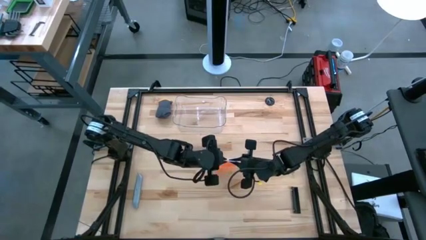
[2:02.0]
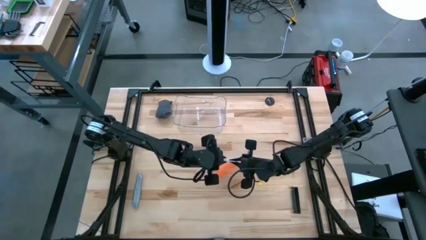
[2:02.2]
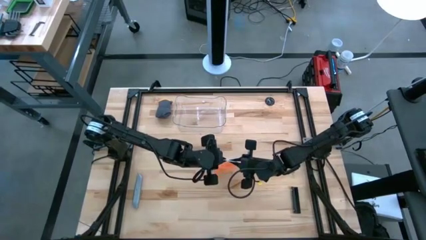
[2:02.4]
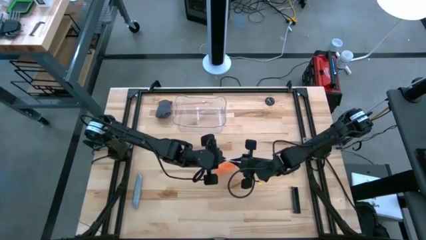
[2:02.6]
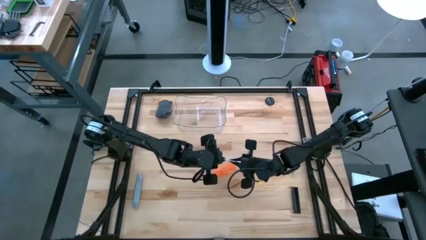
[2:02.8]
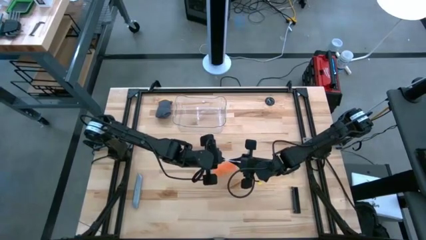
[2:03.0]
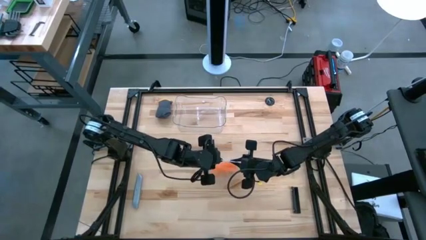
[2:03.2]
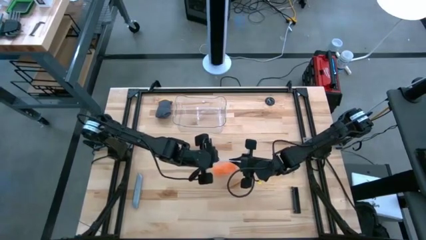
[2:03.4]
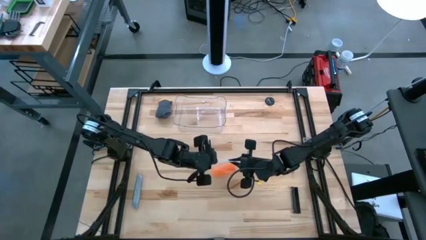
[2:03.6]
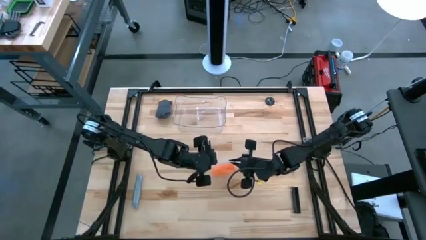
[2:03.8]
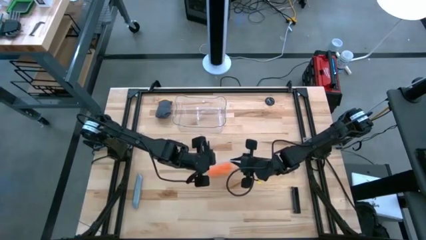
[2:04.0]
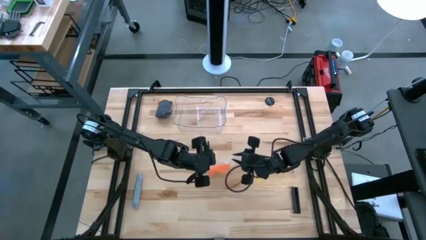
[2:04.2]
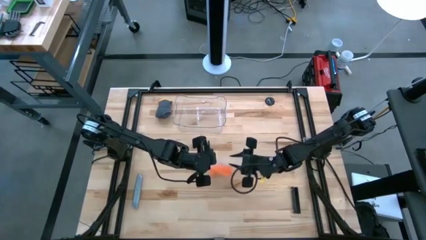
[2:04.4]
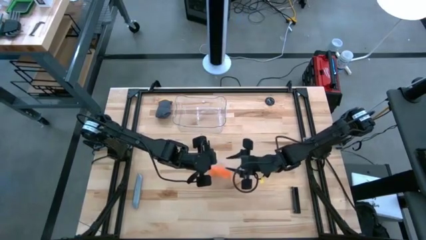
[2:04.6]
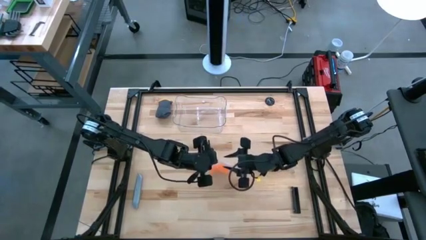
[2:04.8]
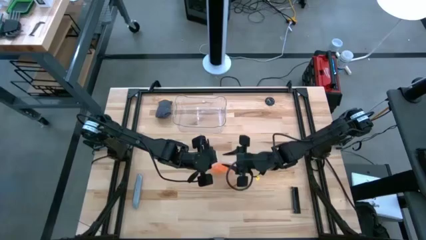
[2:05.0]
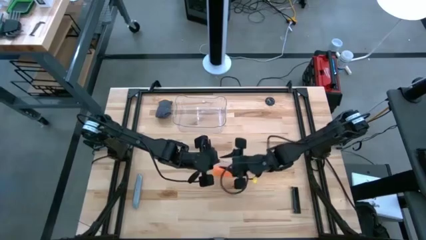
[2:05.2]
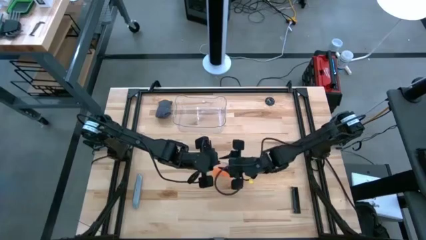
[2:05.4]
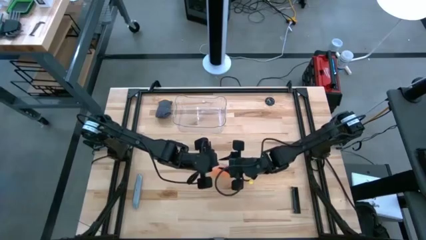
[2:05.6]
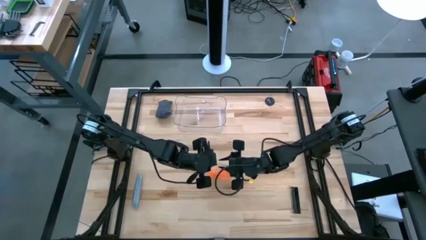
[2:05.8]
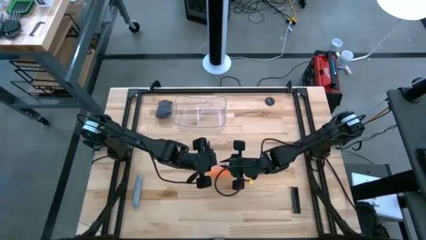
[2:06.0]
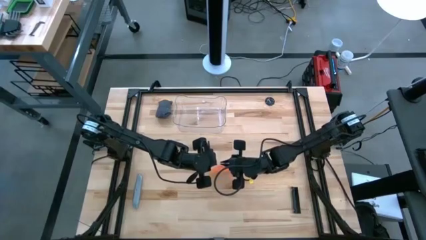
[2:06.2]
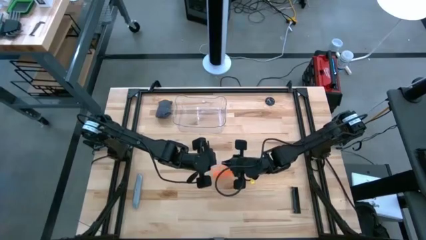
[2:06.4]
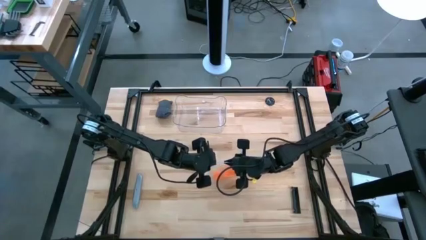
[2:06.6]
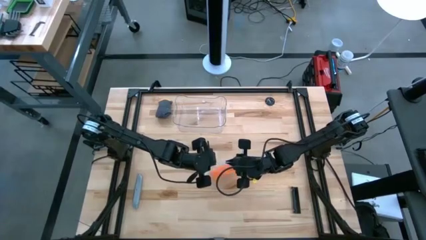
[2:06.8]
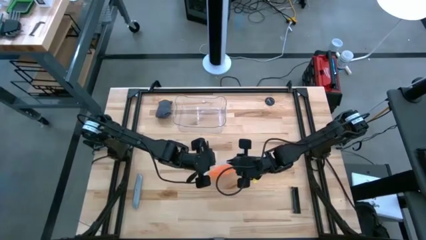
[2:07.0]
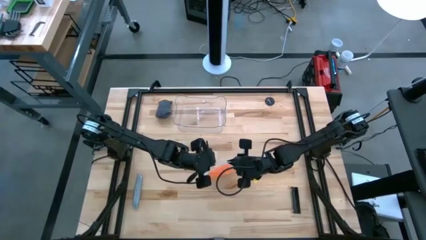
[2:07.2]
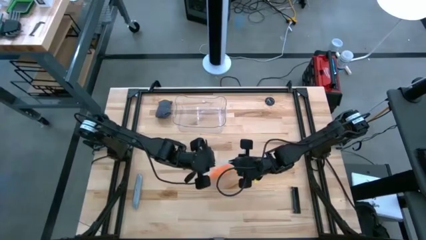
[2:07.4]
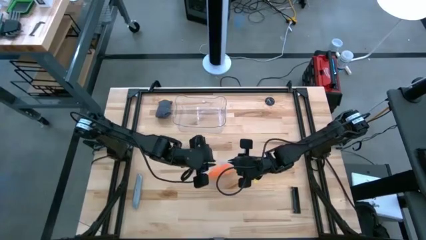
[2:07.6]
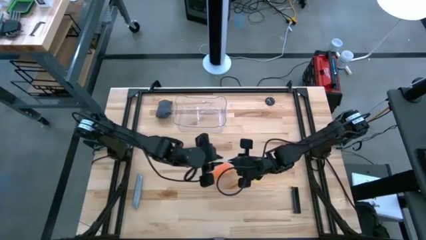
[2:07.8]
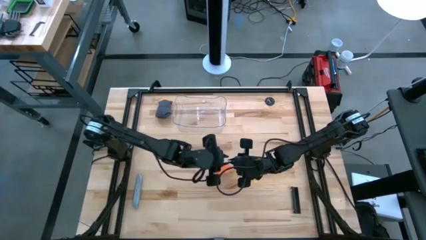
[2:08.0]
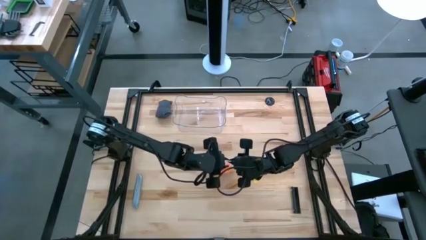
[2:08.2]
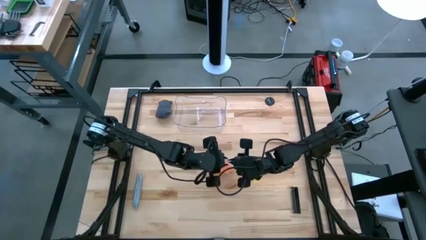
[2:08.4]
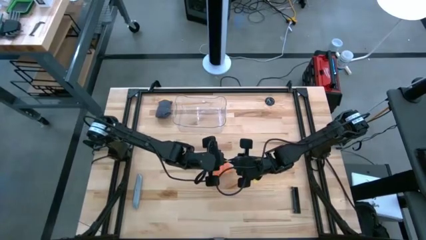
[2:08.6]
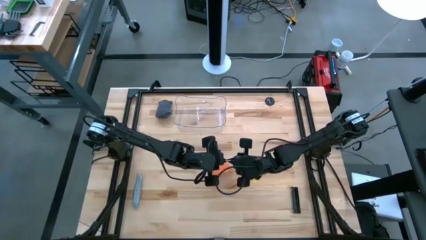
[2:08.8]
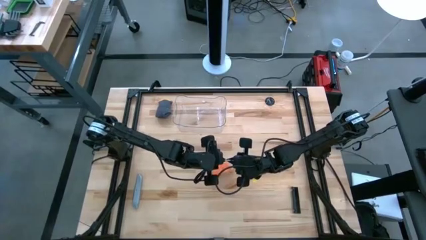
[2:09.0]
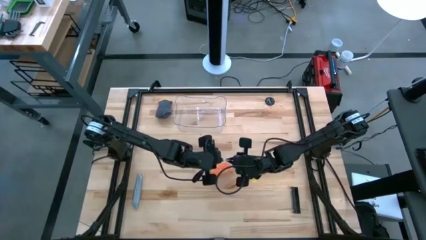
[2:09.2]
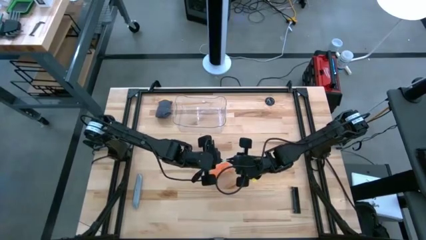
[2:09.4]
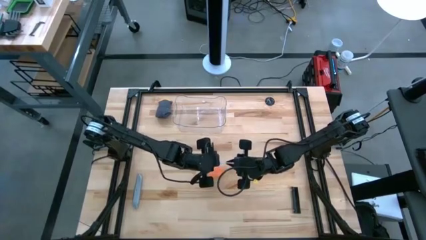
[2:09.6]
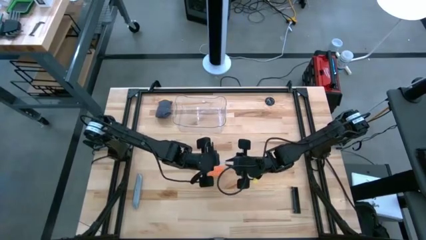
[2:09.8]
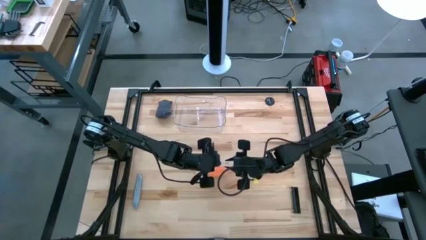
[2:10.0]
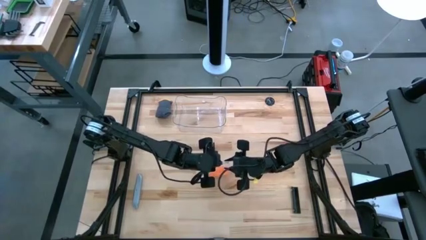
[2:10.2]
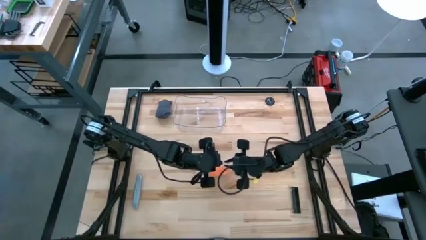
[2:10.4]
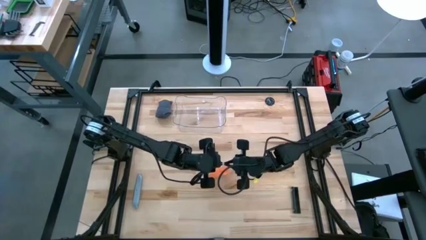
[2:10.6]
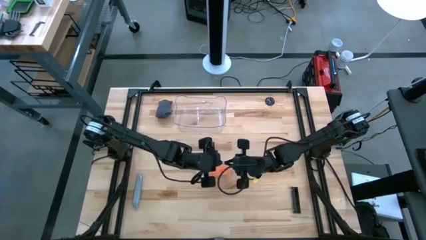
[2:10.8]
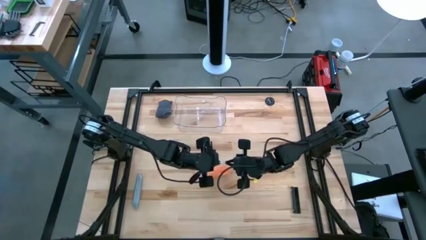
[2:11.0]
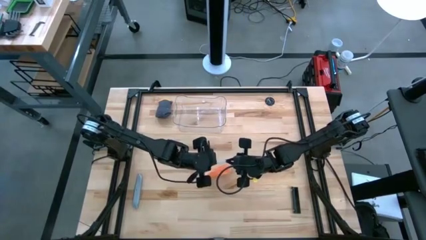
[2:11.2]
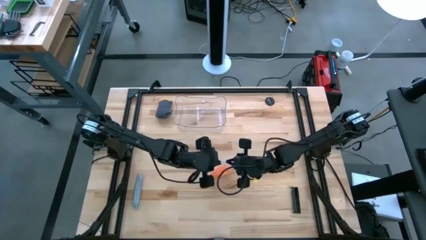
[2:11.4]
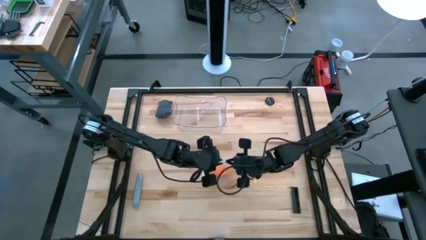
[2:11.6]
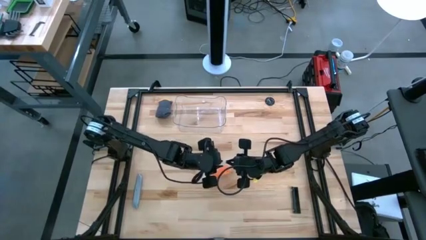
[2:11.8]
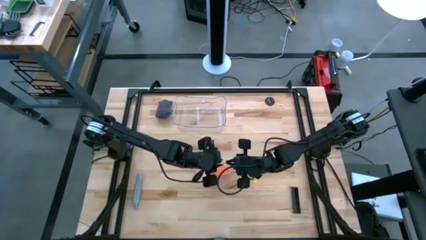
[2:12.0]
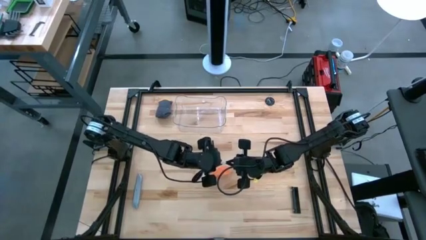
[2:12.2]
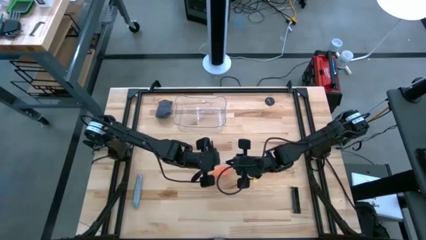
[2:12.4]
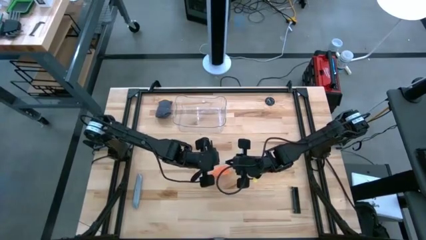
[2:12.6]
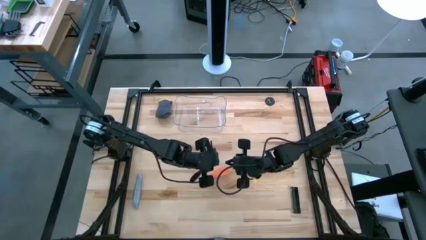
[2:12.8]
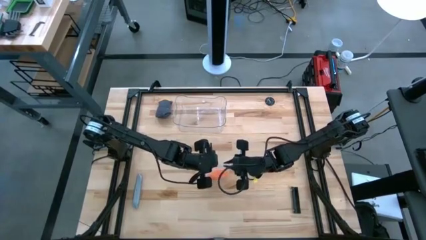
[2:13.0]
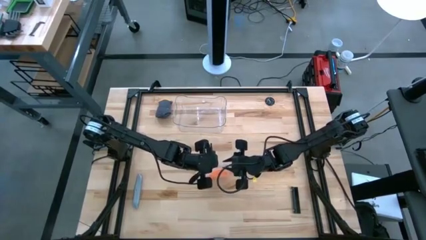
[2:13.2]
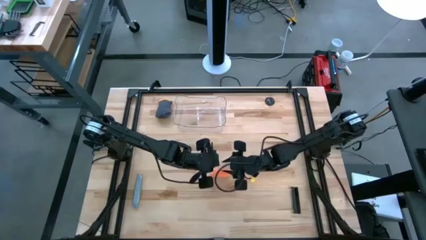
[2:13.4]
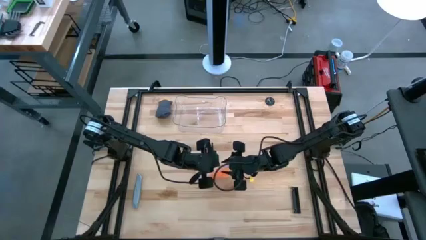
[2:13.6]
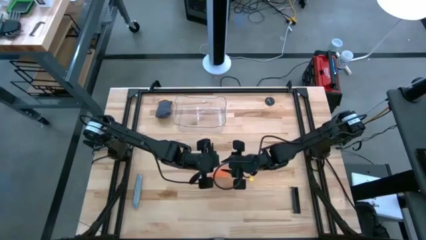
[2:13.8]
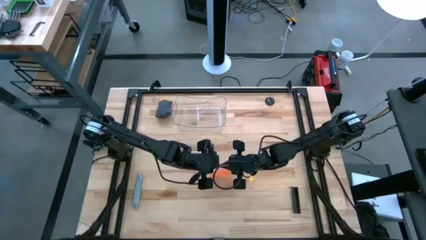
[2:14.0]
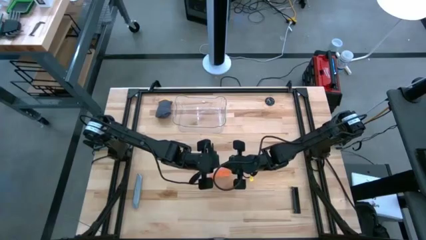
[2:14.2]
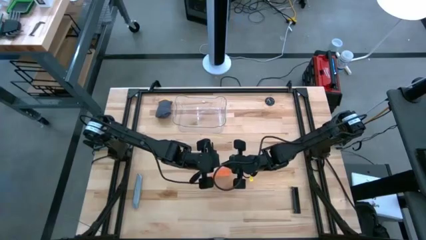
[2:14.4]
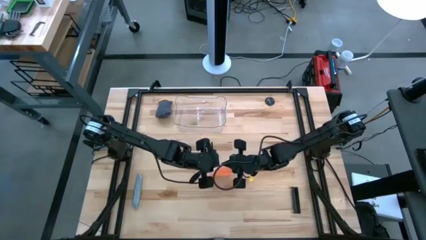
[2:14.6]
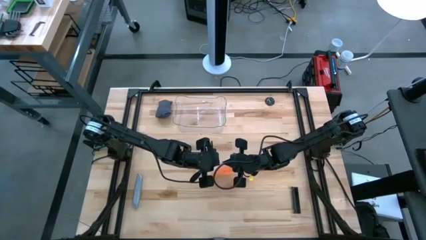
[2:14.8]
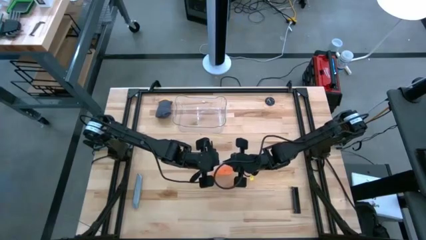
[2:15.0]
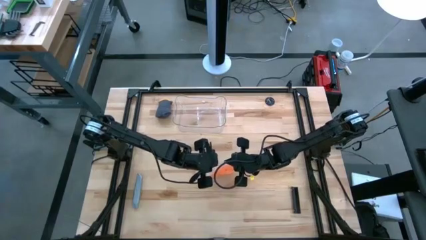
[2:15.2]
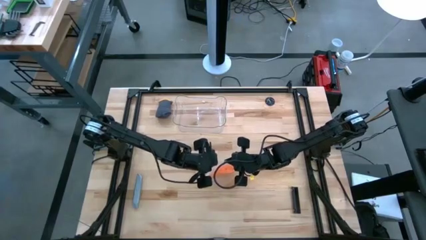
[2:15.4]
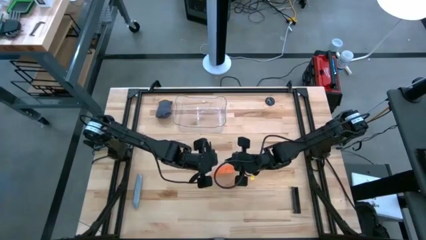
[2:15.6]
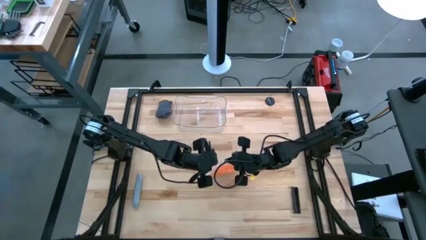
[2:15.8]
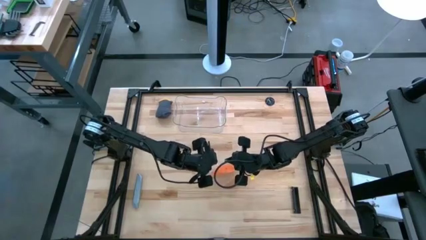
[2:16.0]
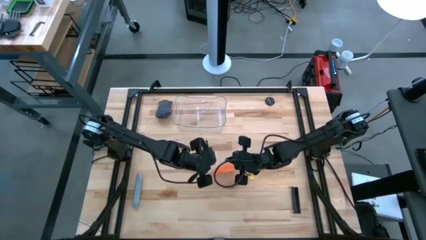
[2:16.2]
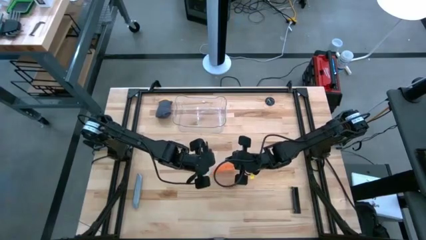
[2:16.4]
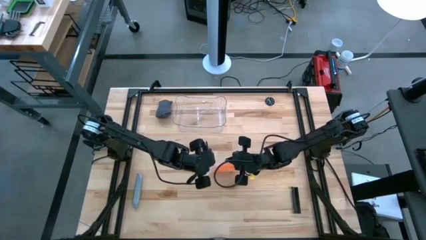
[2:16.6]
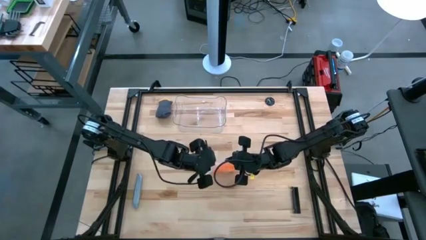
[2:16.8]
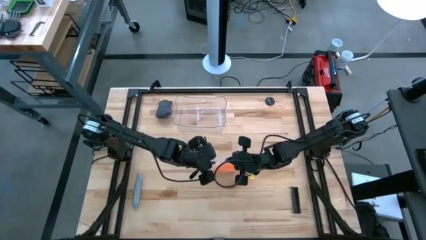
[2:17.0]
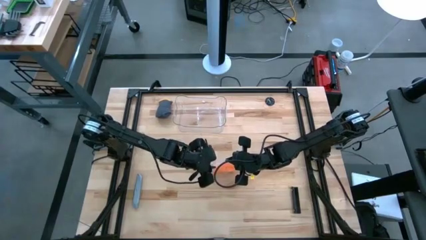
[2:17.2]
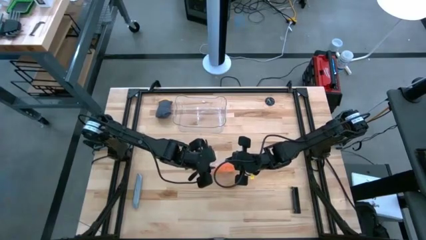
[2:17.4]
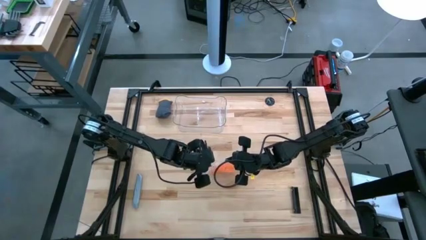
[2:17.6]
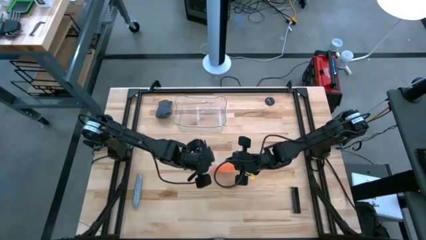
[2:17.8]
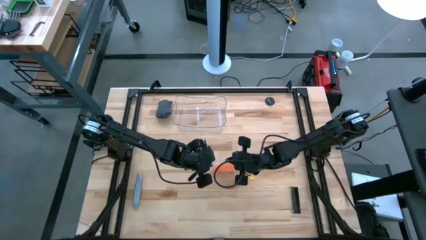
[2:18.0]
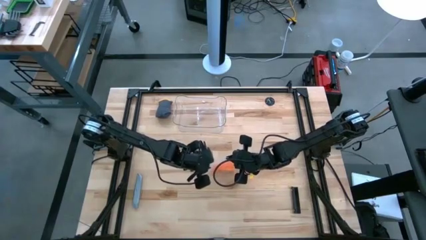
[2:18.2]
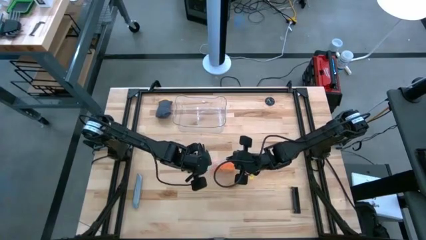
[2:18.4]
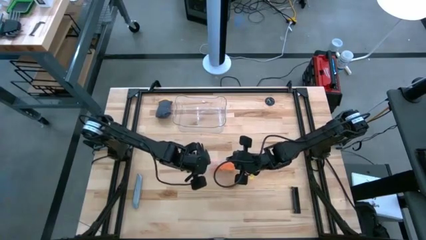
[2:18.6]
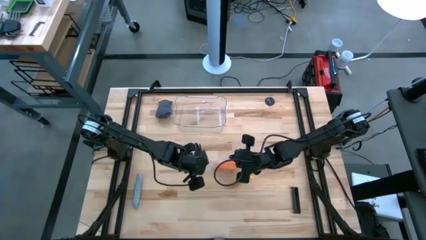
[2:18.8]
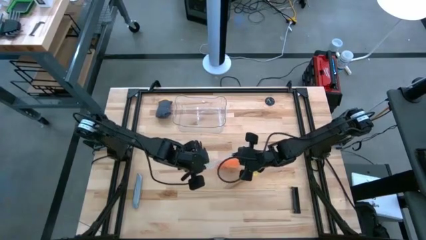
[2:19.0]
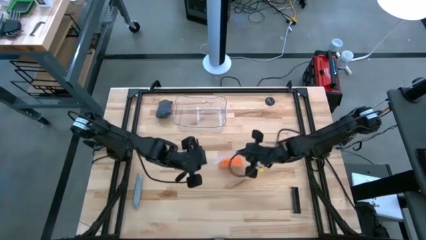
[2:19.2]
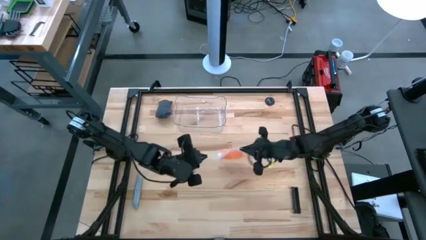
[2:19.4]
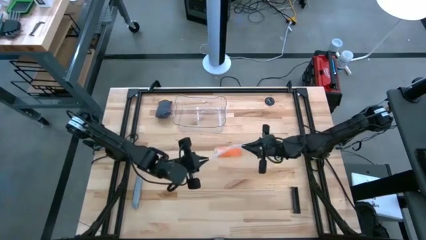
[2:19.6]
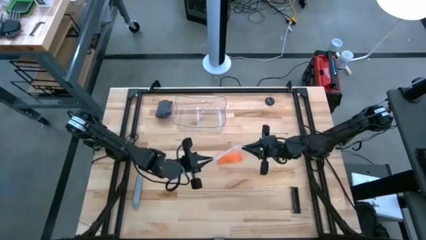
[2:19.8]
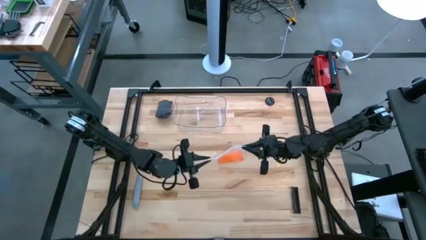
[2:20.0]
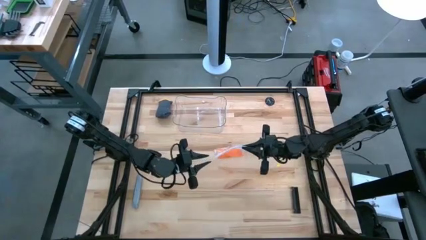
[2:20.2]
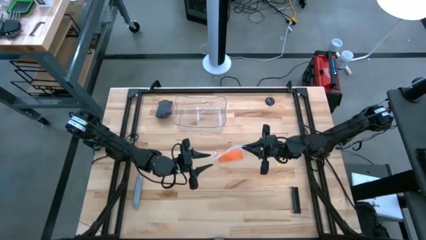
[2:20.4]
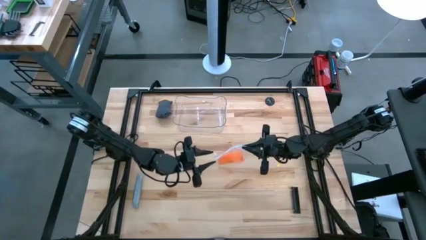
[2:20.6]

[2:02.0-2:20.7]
Task: Roll bandage
Put the zip bag into the transparent bin
